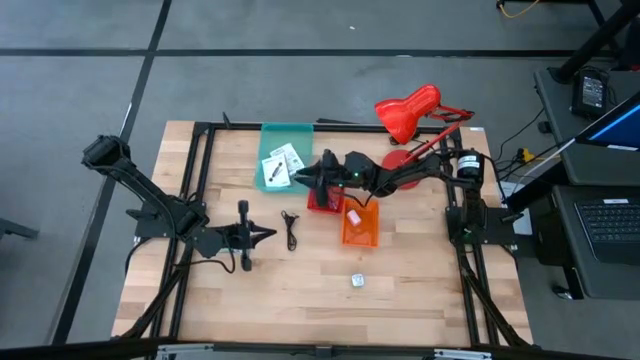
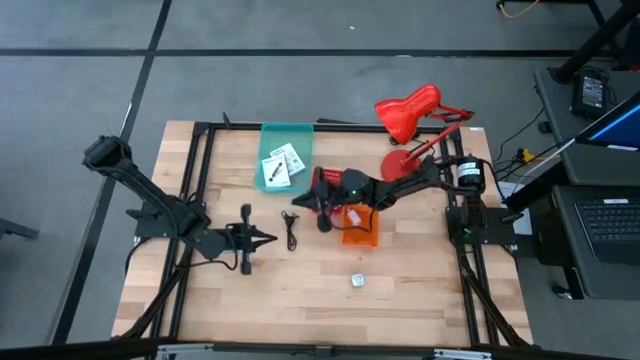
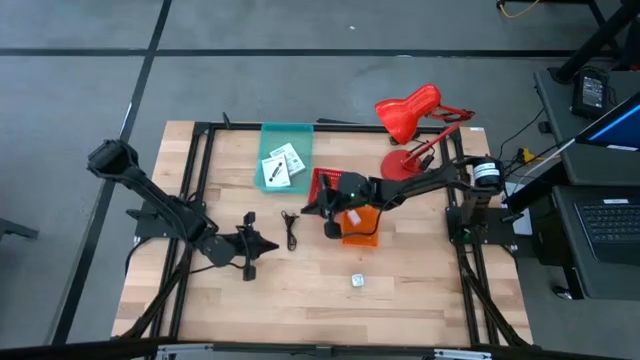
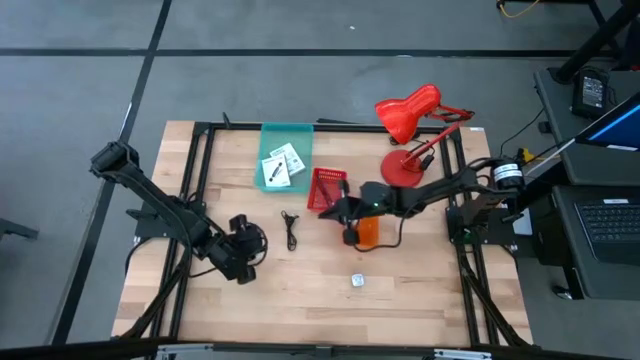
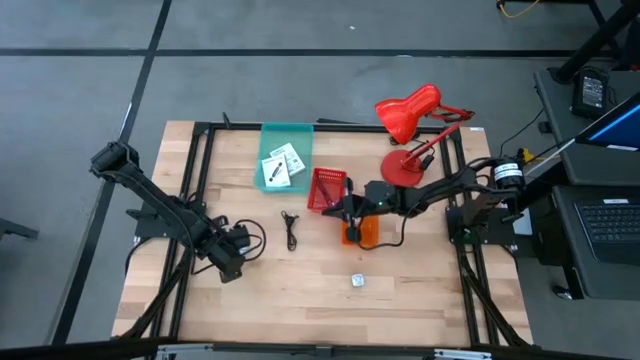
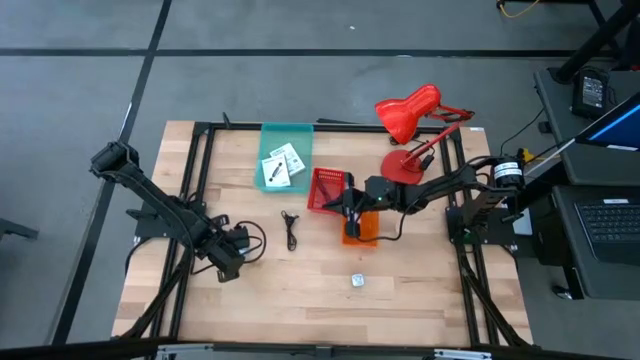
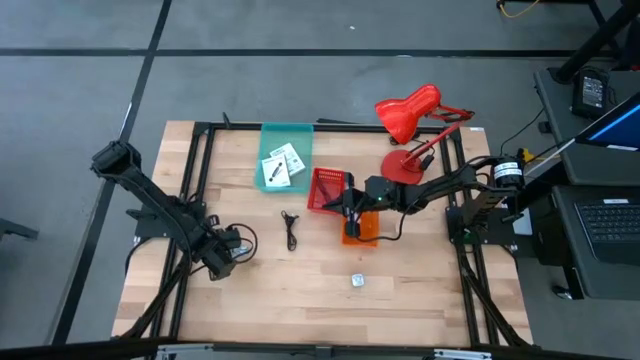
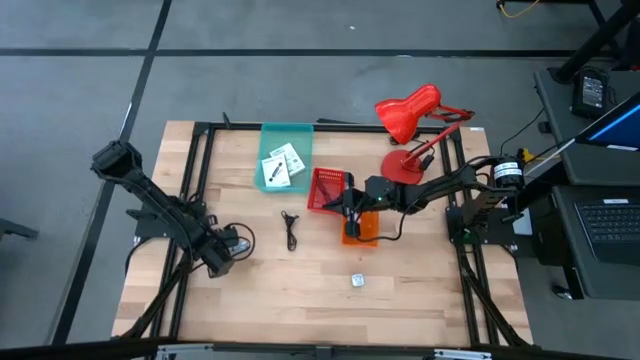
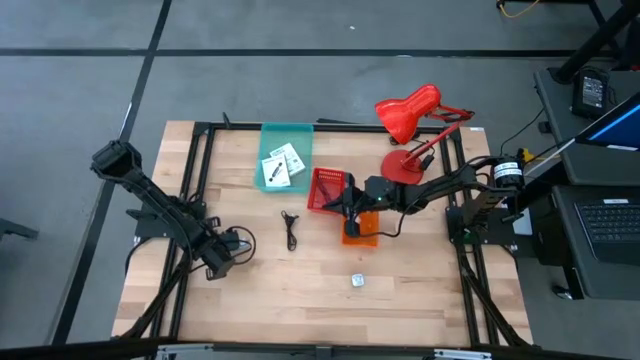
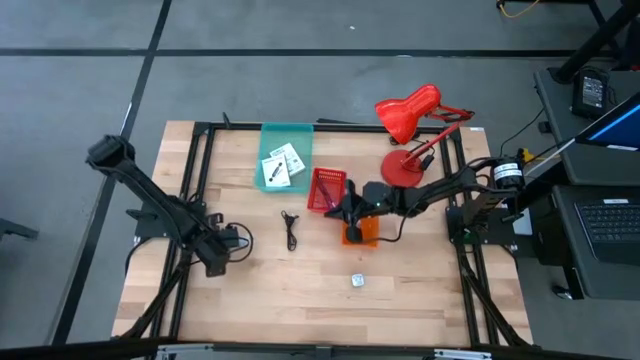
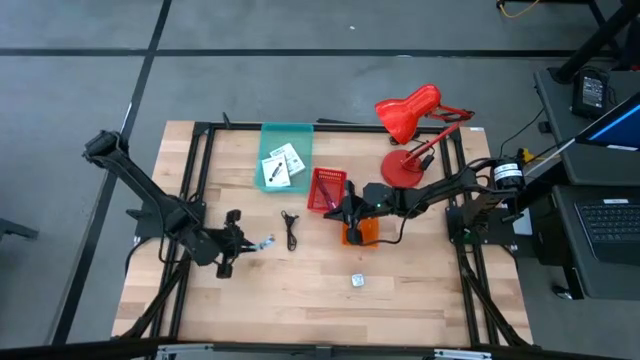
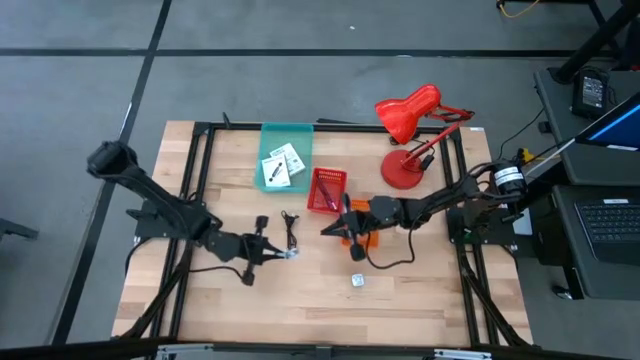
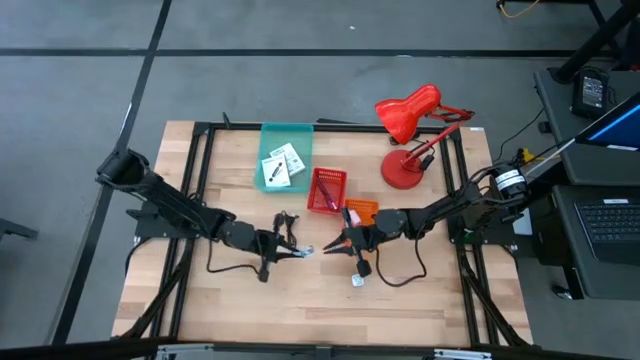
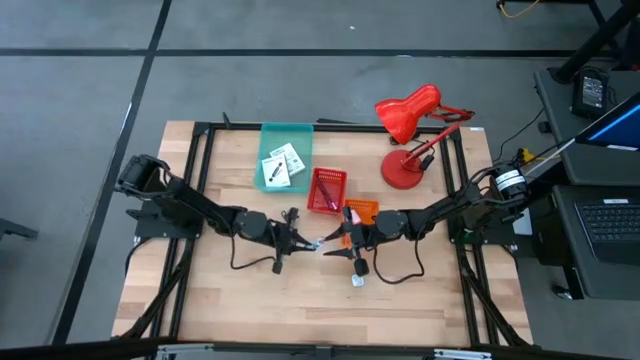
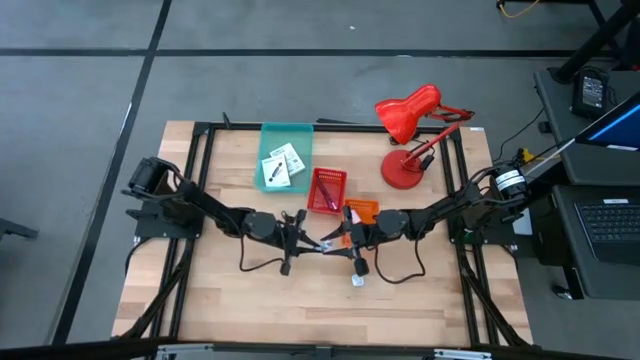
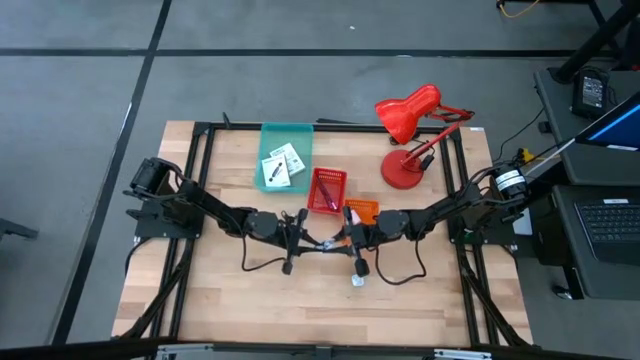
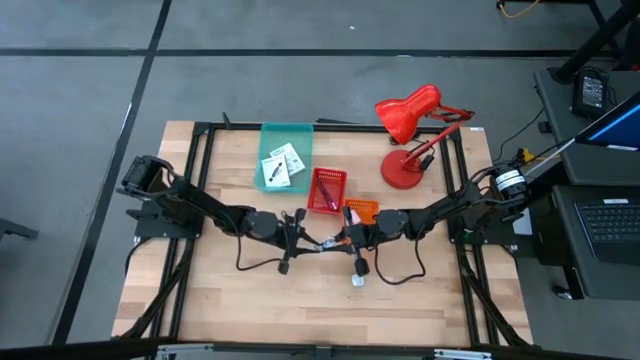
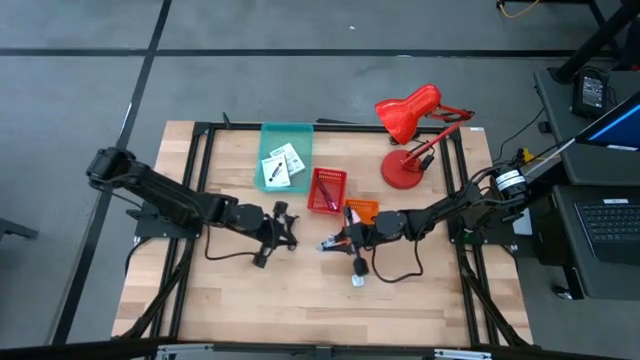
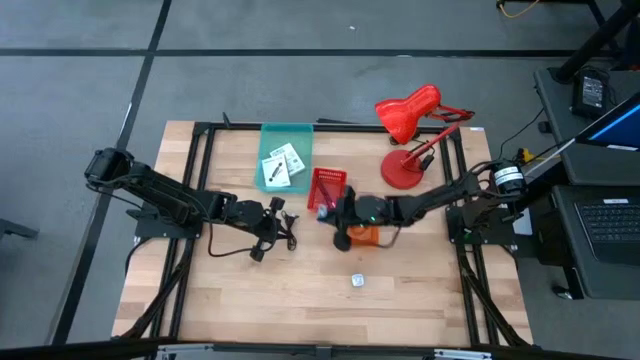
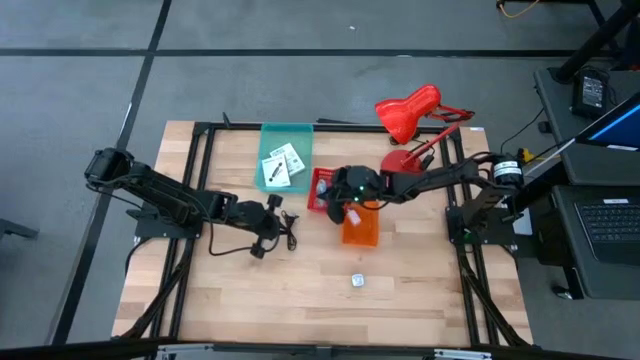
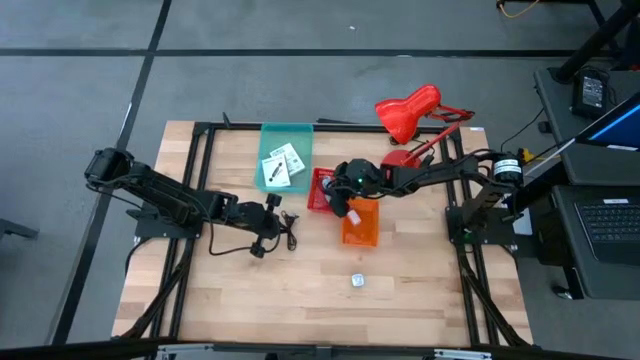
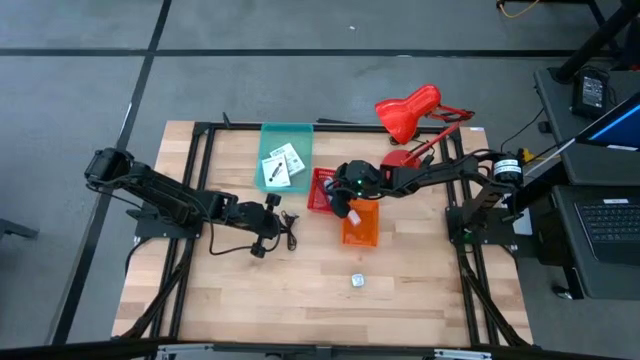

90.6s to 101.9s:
Task: Pick and place items into bin
Put the blue charger cable into the red basket

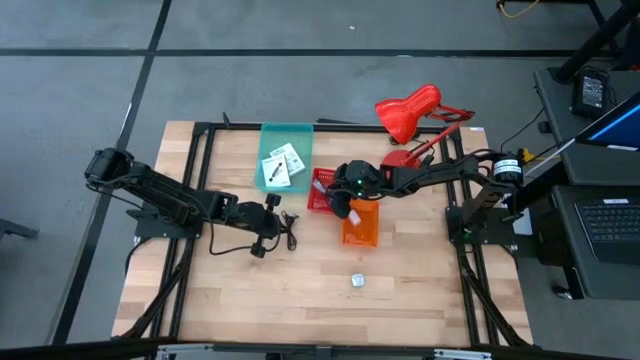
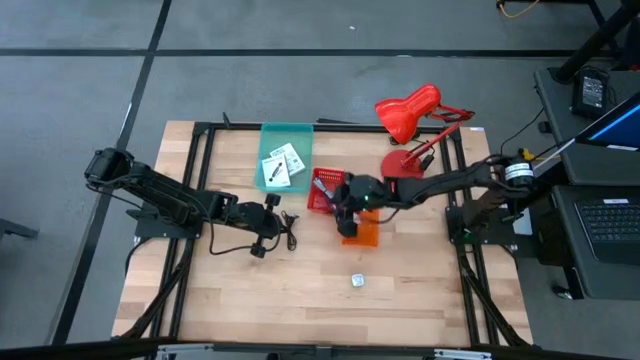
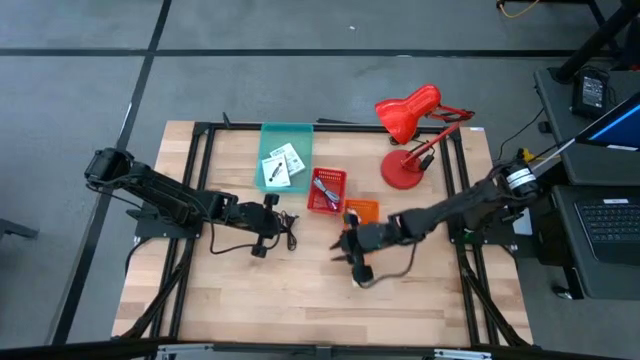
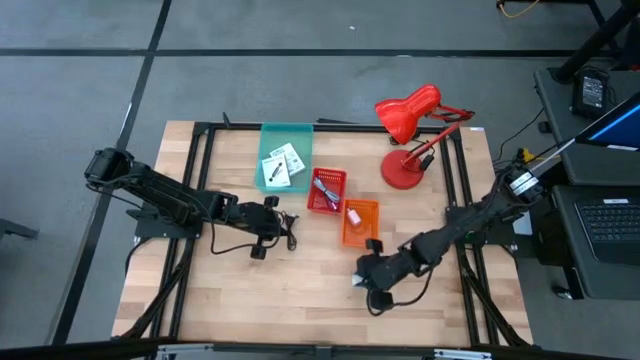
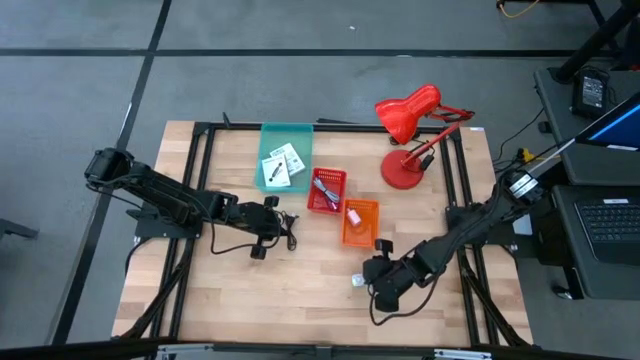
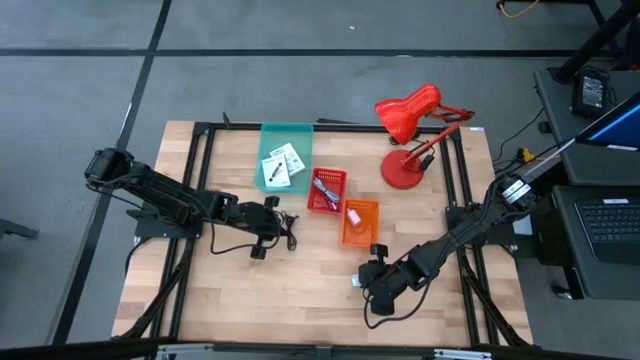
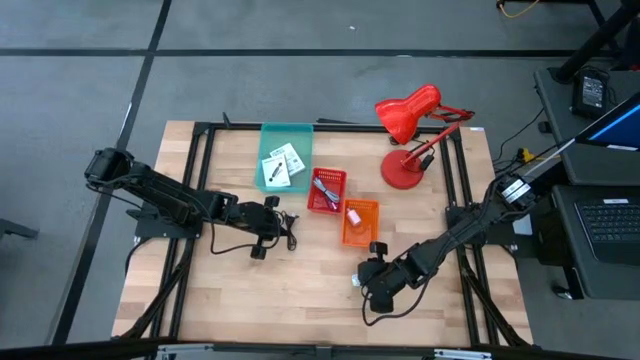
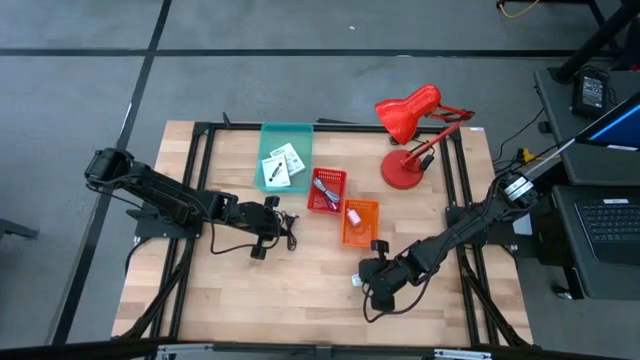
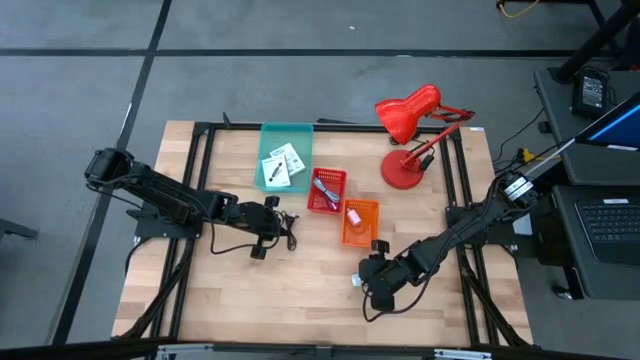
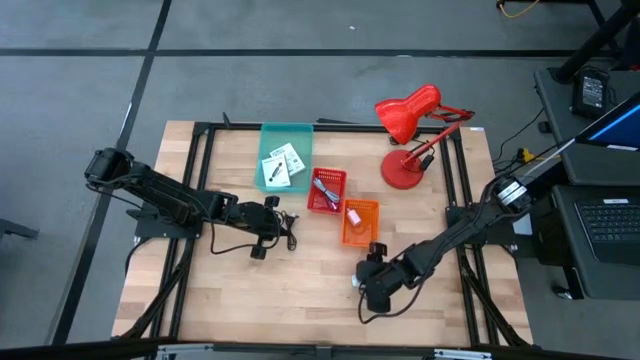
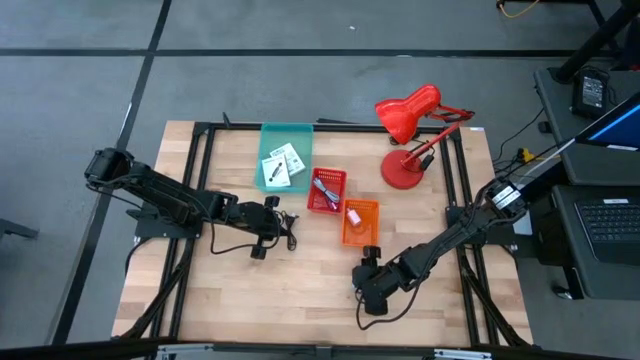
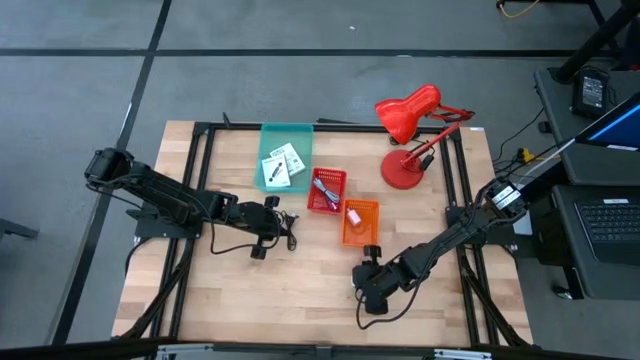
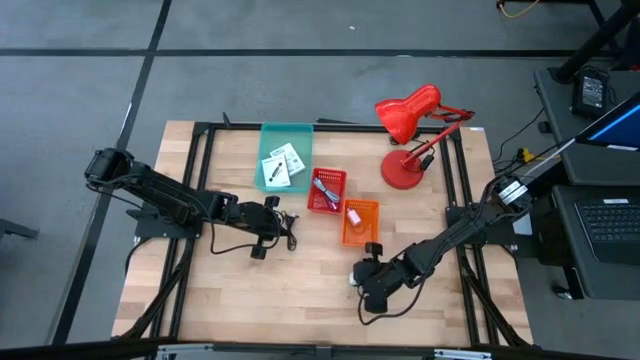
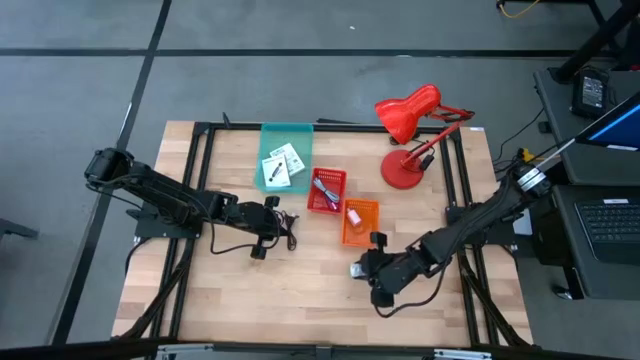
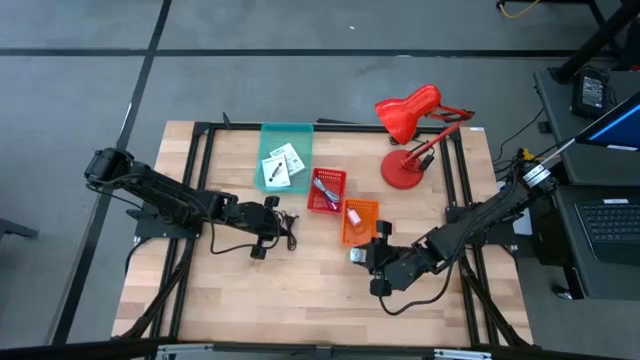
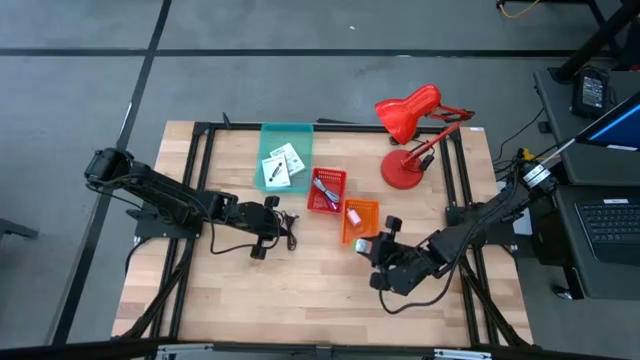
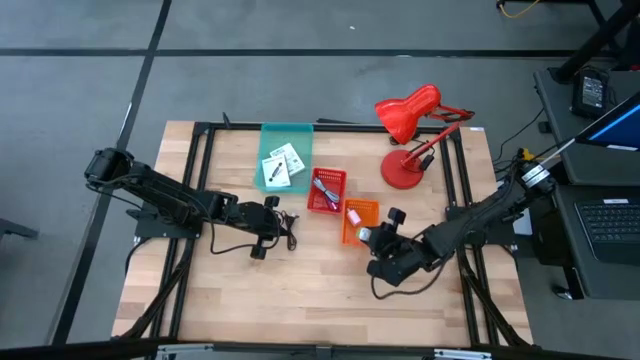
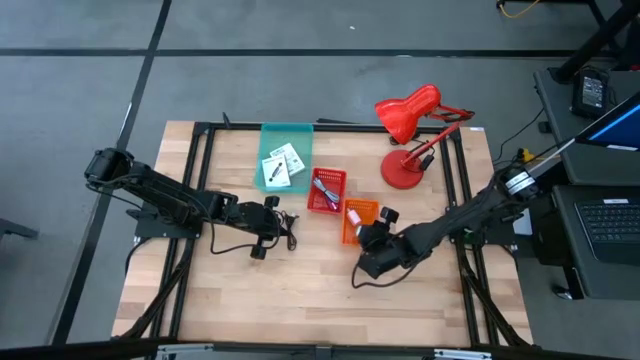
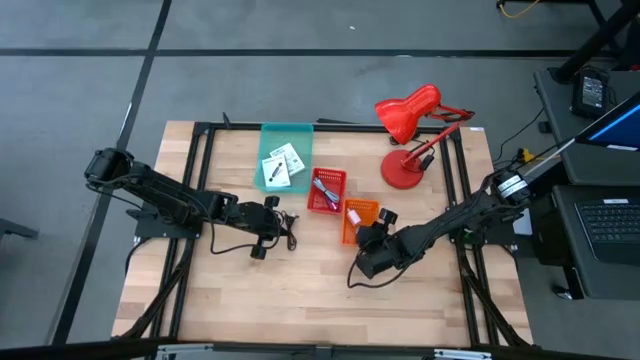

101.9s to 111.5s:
Put the green charger adapter into the orange basket

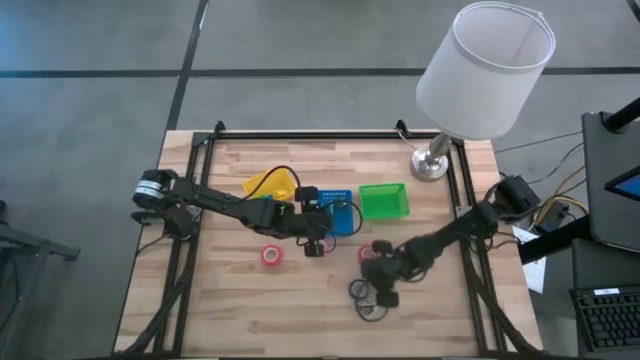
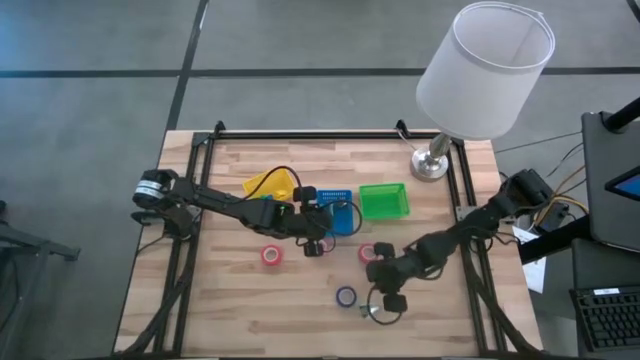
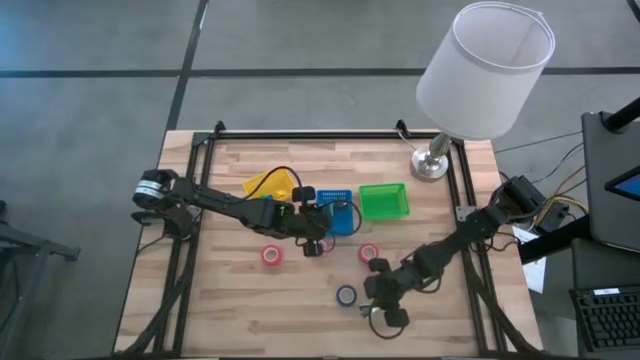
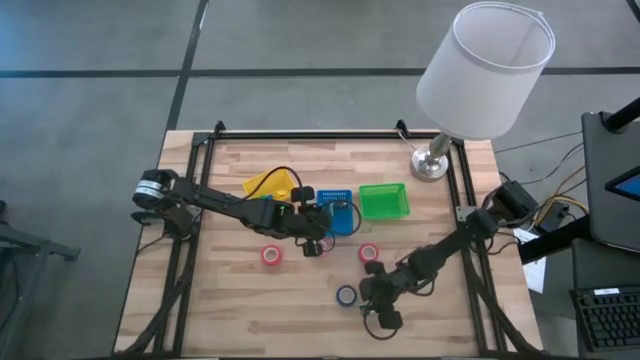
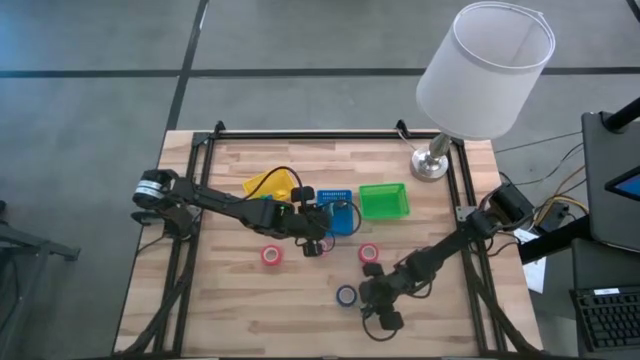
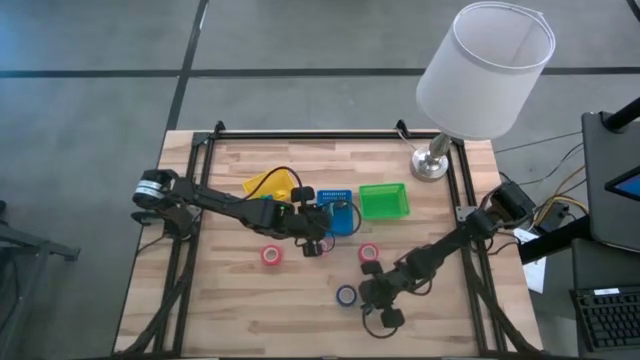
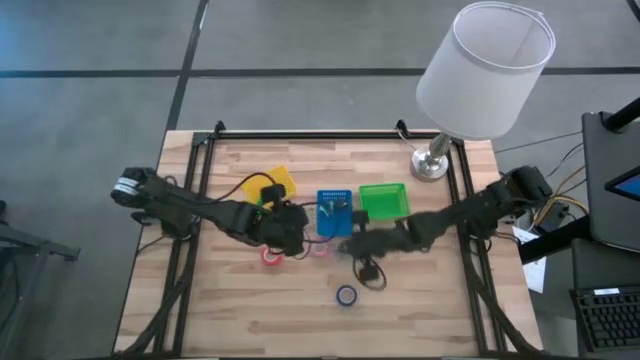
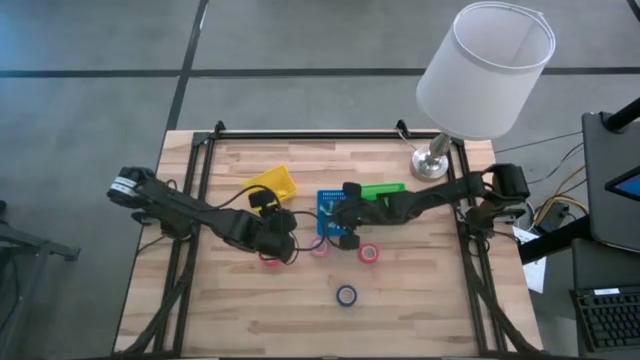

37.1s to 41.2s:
Task: Pick and place Stapler, Stapler remover, tape
Put the light blue staple remover into the blue basket
